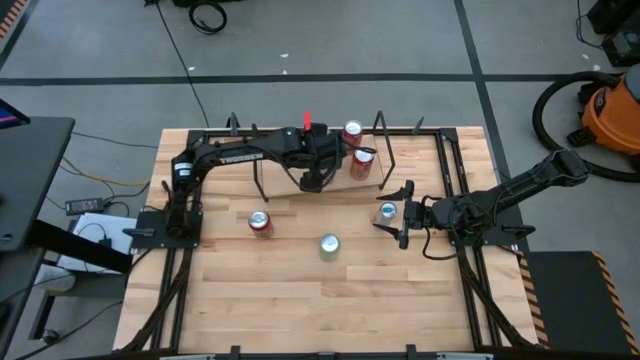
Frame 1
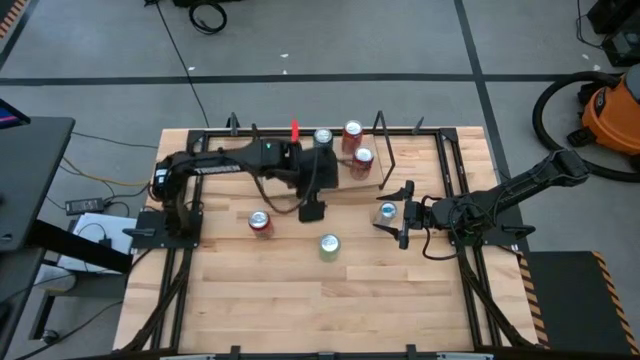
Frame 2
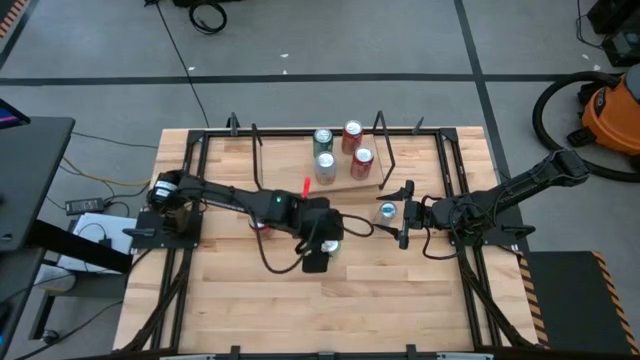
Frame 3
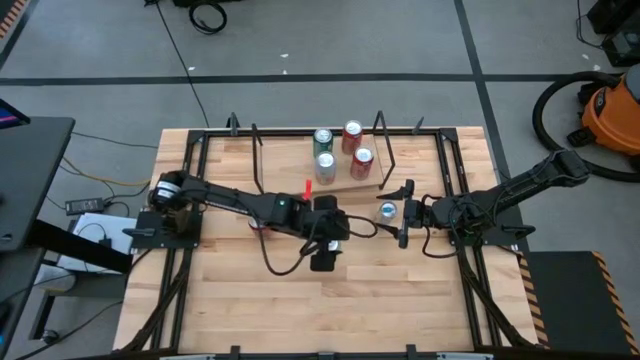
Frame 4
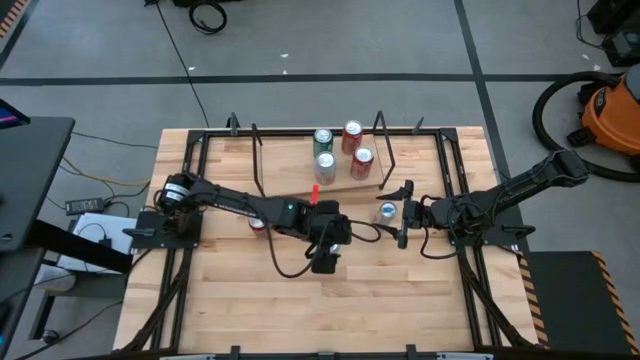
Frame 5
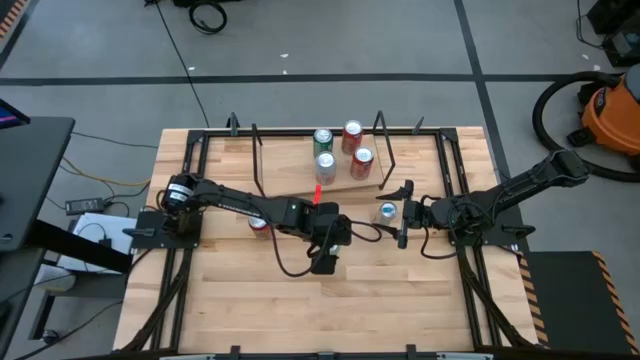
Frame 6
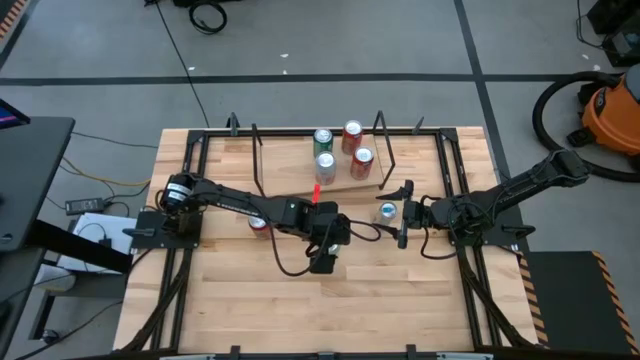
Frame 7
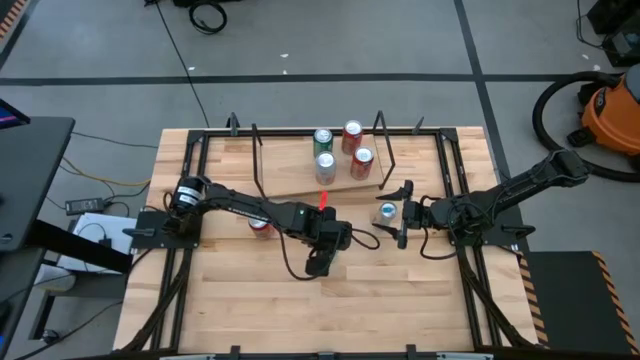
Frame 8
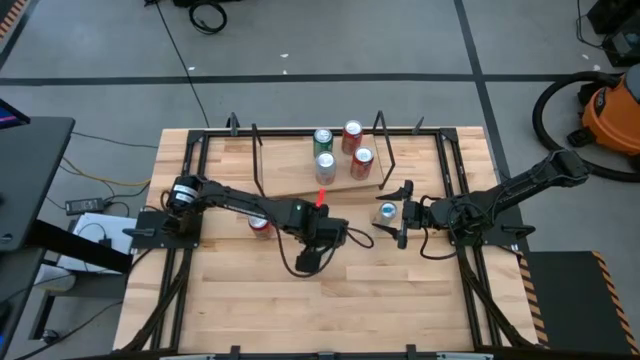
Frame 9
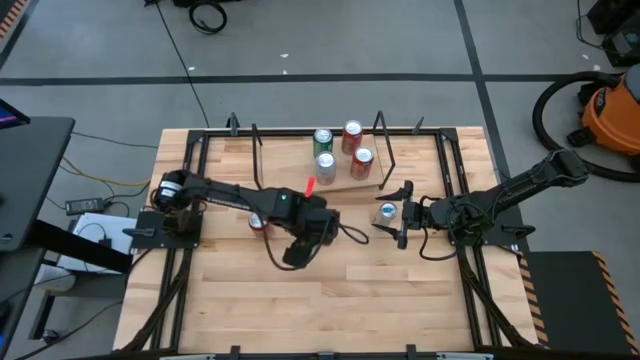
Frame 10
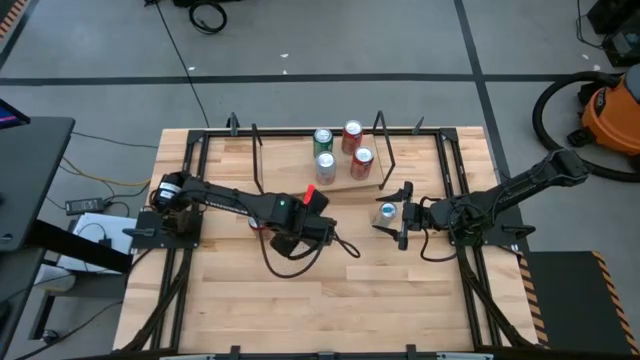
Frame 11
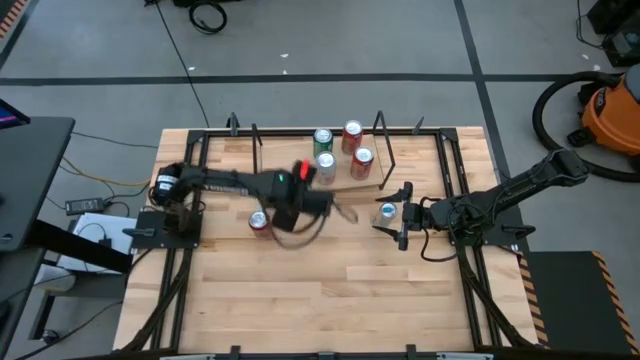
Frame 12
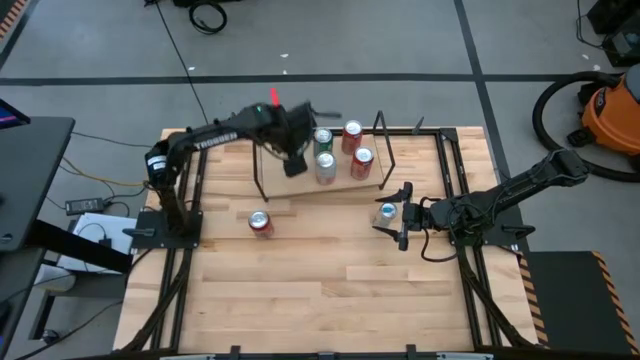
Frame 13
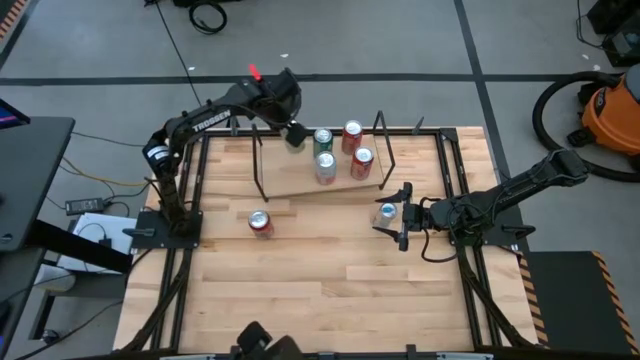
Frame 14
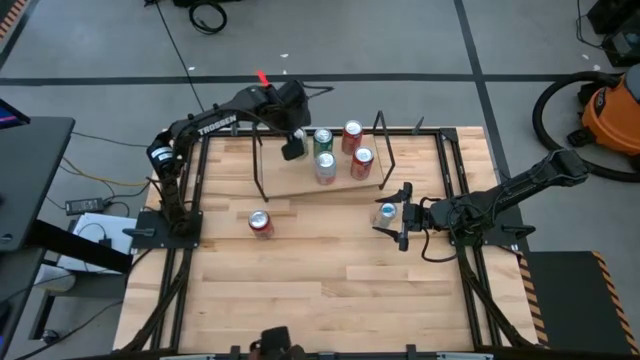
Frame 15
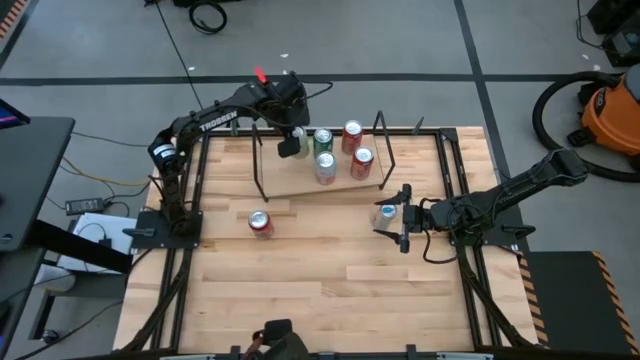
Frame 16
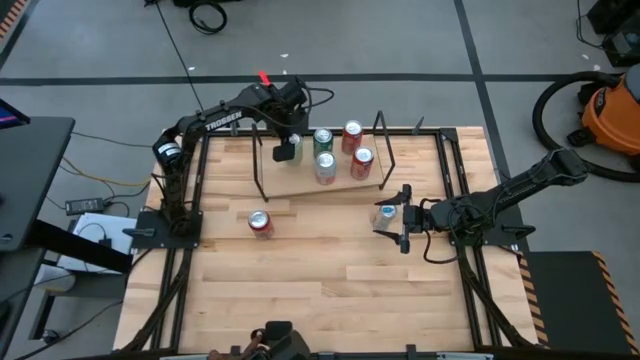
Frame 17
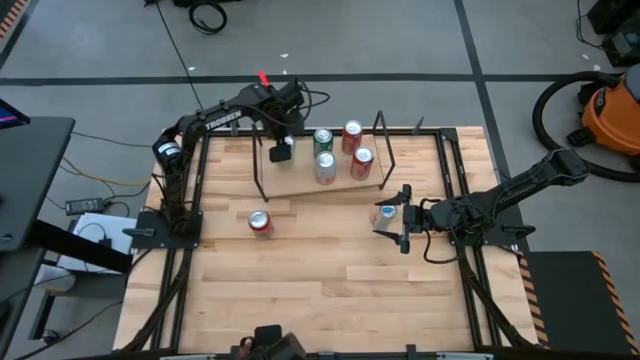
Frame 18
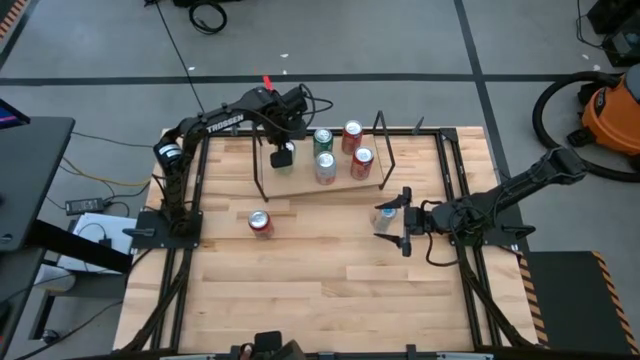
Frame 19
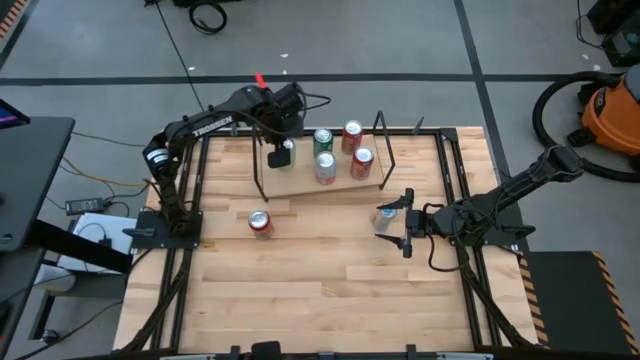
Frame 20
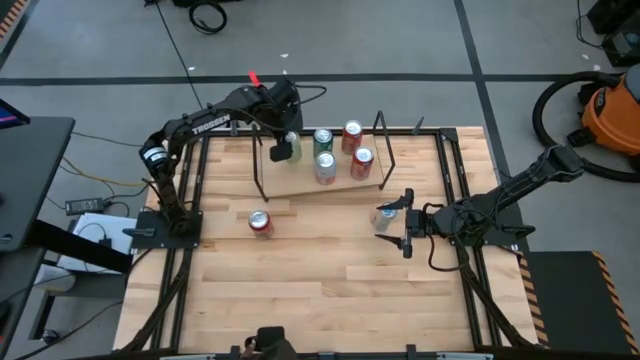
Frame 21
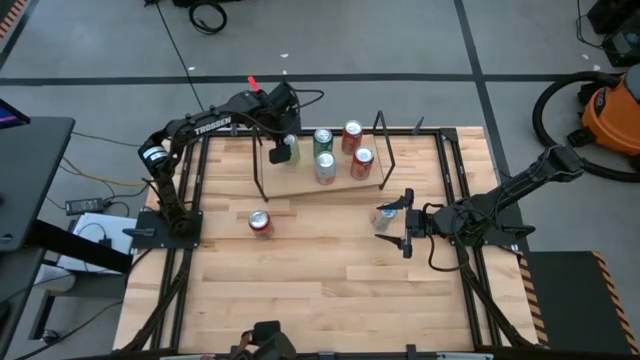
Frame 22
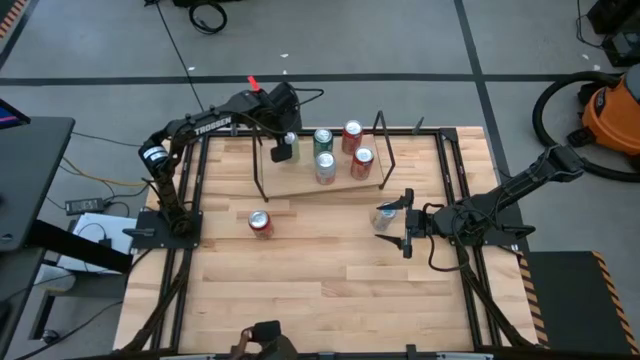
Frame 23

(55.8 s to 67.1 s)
Task: Place canned beverage on shelf
Put the light green soda can on the shelf

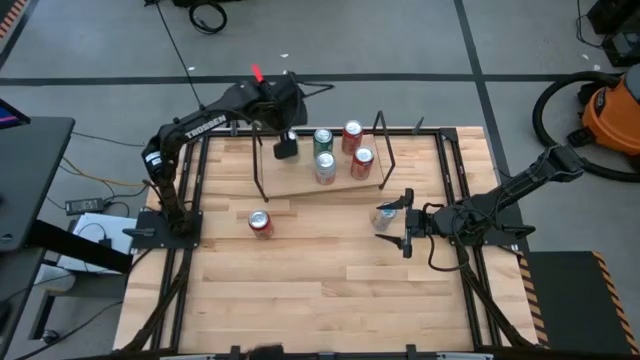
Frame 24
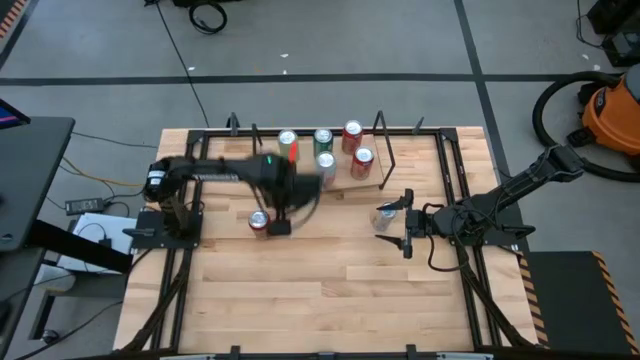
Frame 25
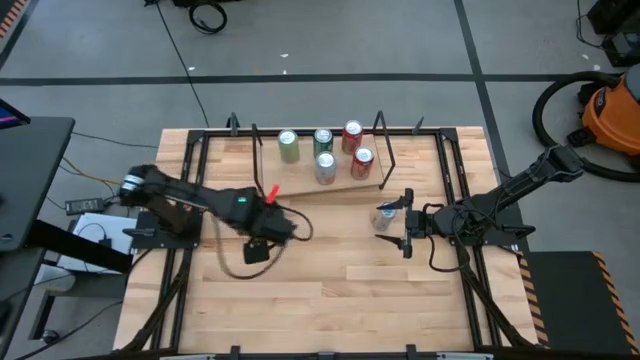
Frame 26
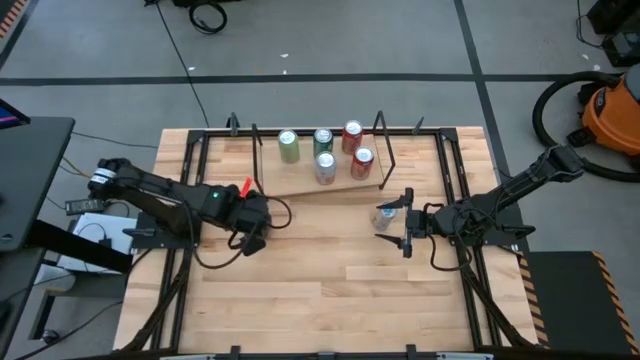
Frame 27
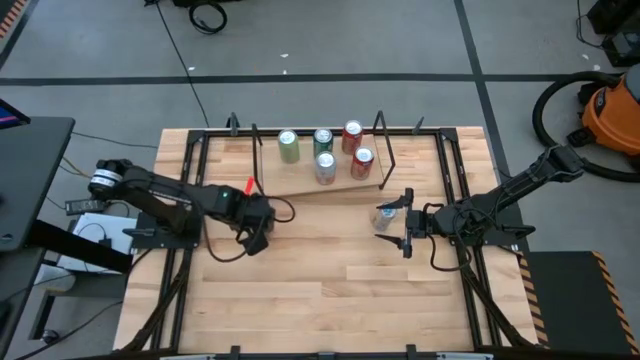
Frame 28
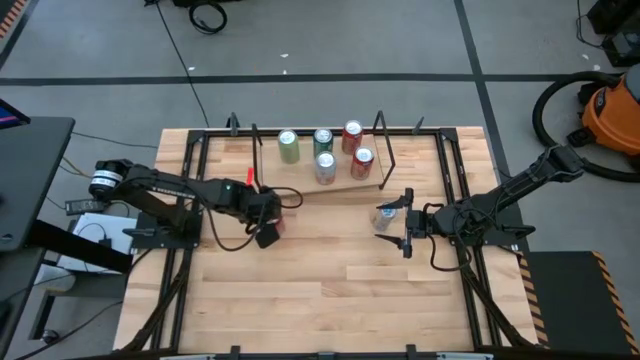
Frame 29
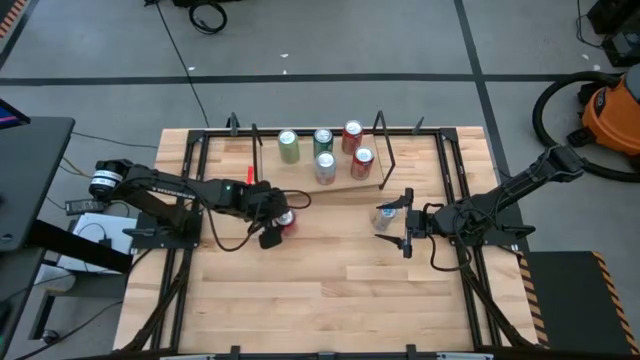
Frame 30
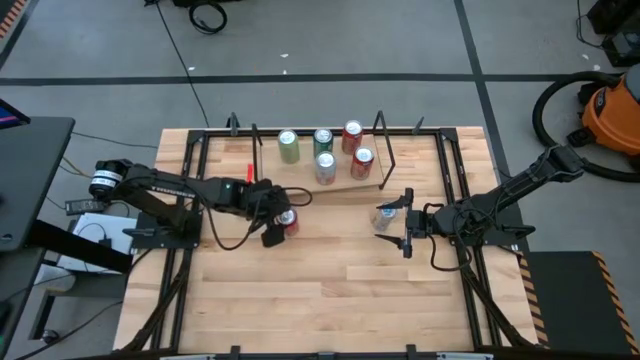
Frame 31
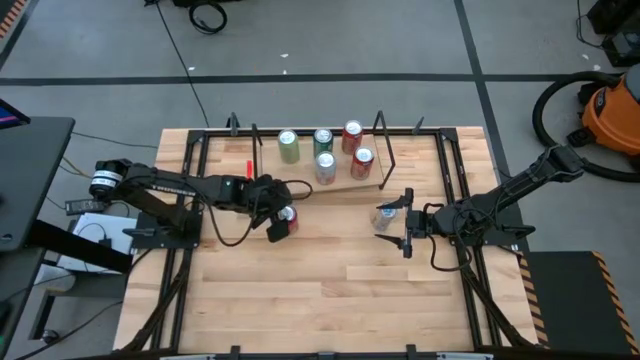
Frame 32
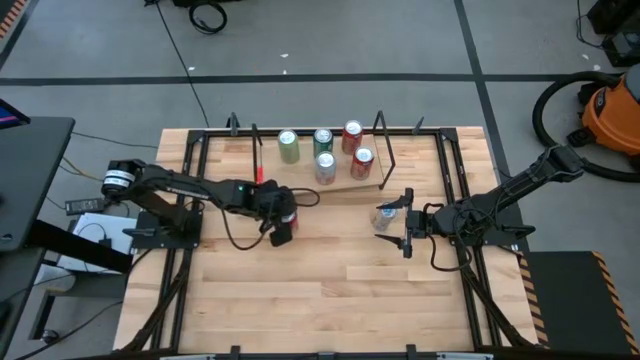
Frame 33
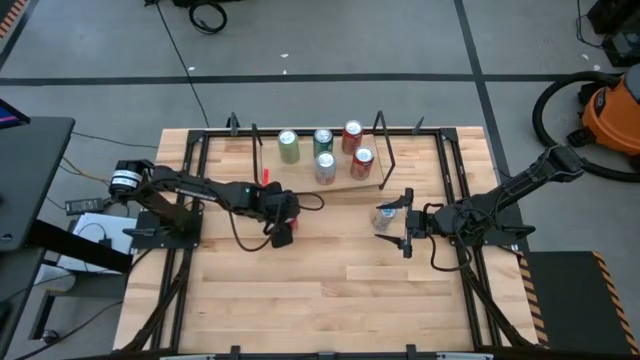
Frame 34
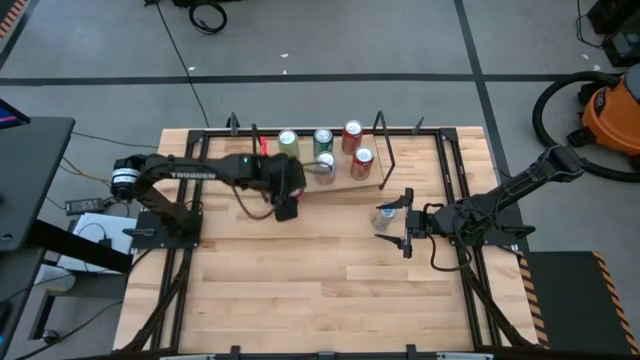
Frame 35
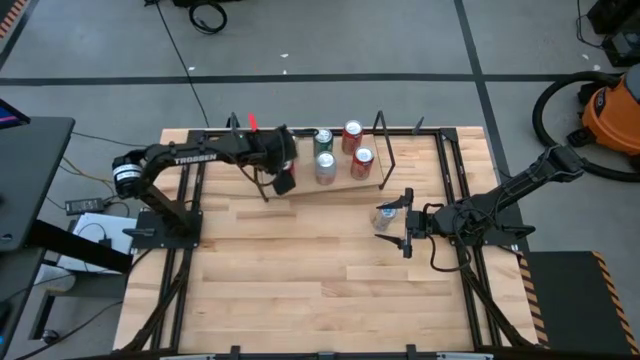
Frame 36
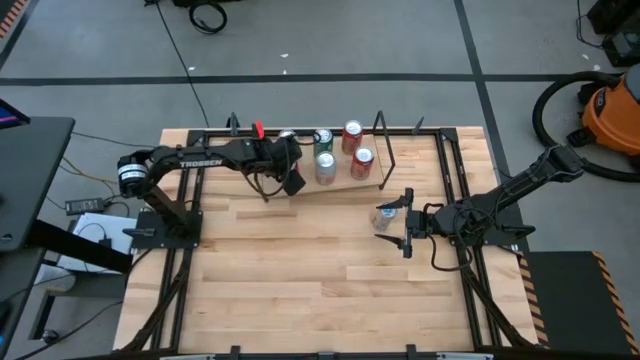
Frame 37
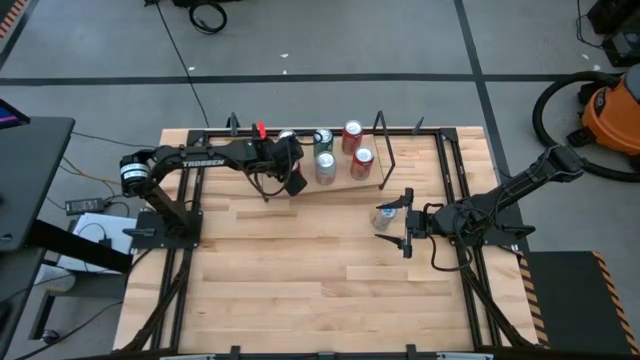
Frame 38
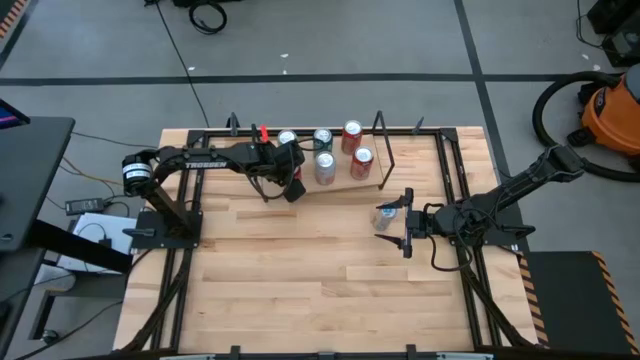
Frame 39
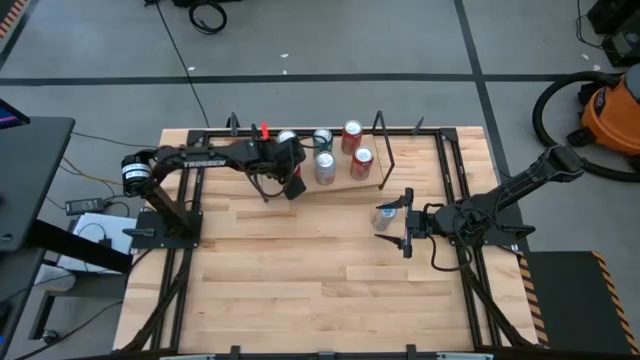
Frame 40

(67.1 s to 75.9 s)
Put the red-black soda can on the shelf

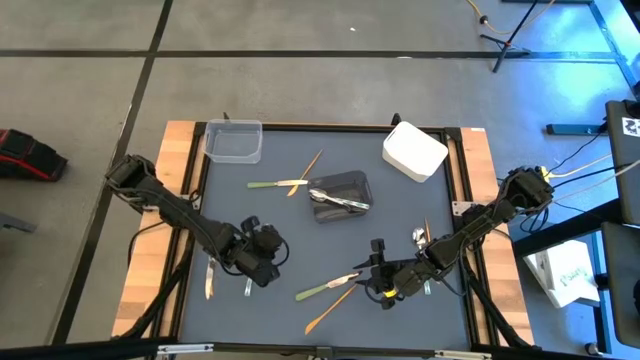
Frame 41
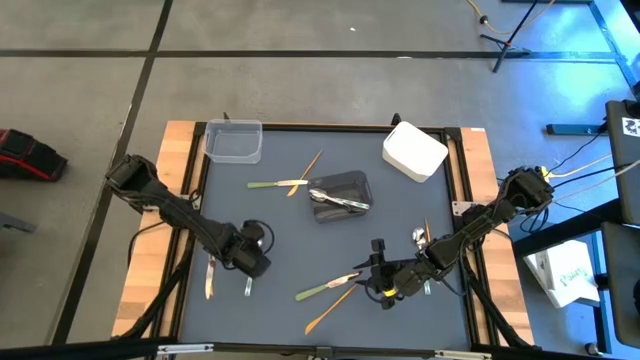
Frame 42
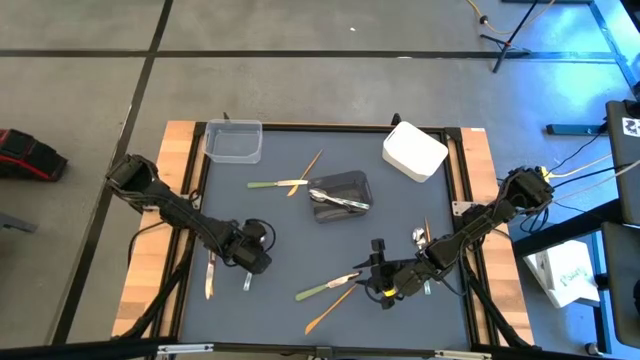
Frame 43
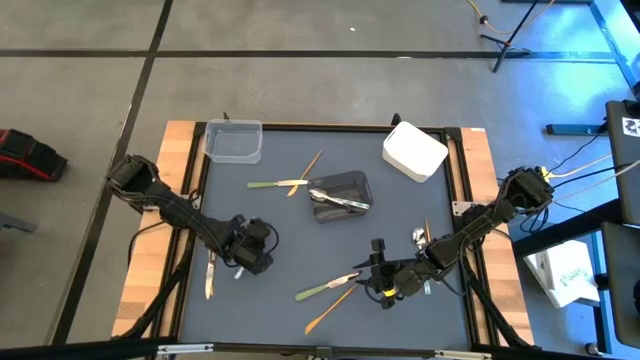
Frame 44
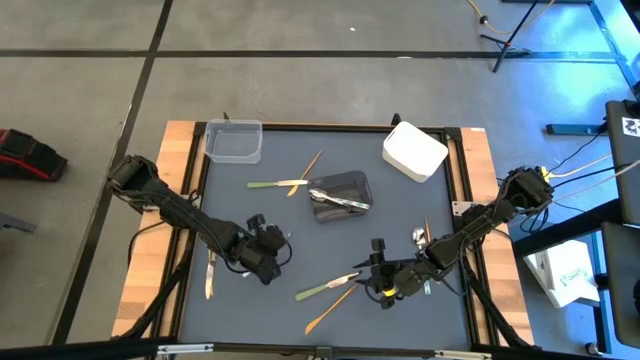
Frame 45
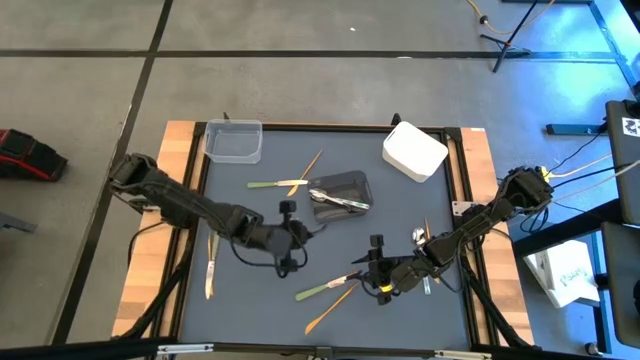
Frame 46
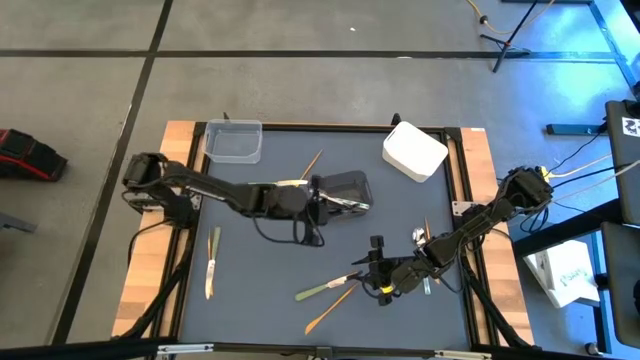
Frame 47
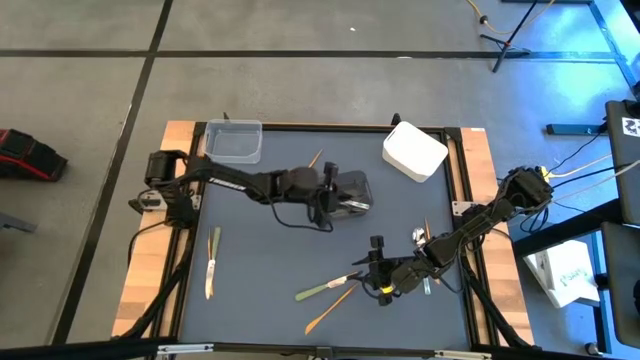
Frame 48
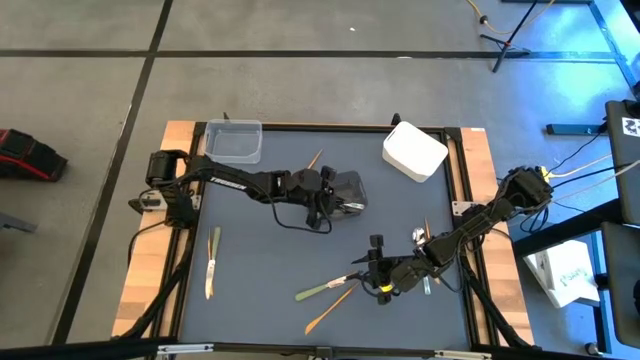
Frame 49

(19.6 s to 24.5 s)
Task: Sort silverware by color (type)
Put the left blue spoon into the black bin
